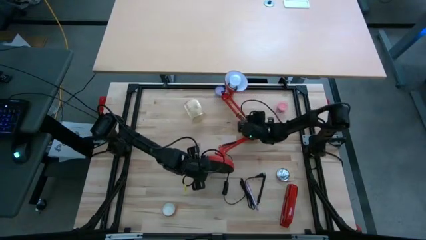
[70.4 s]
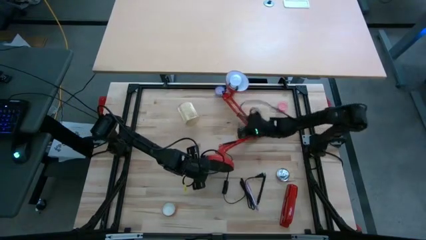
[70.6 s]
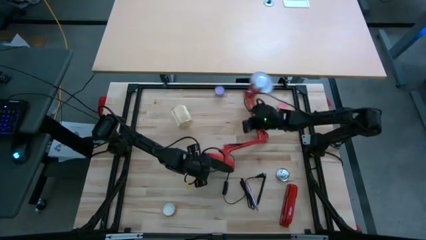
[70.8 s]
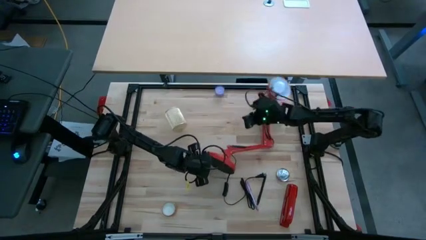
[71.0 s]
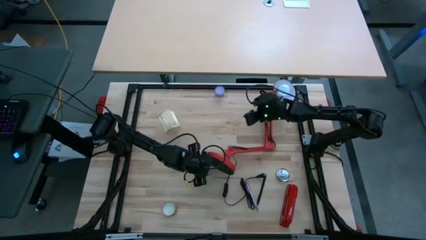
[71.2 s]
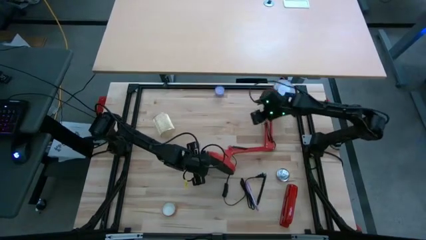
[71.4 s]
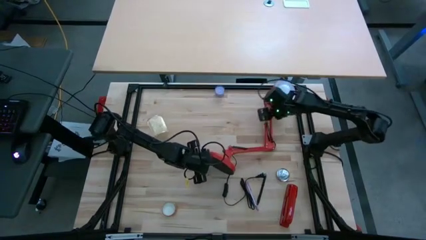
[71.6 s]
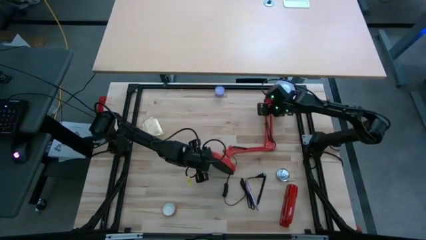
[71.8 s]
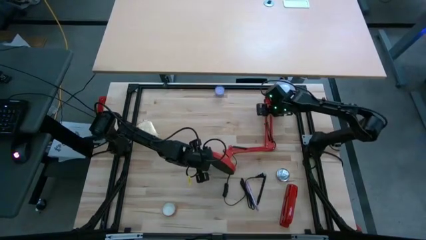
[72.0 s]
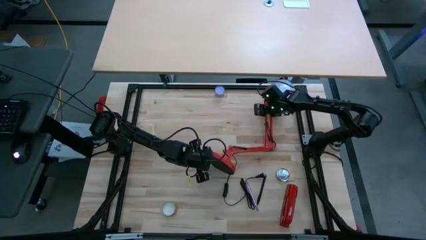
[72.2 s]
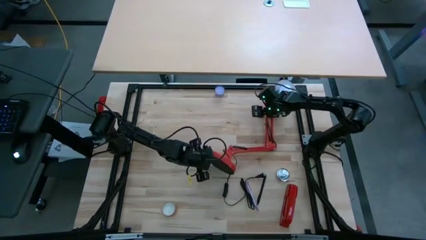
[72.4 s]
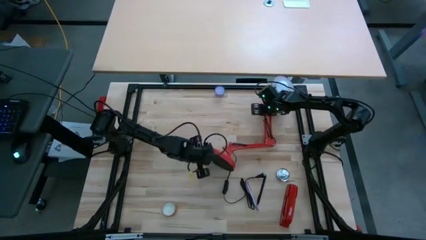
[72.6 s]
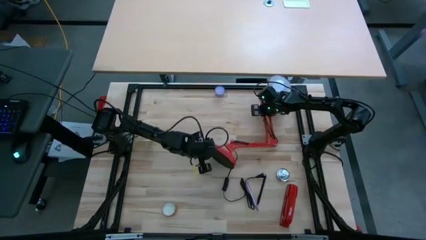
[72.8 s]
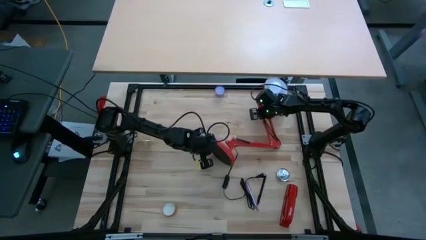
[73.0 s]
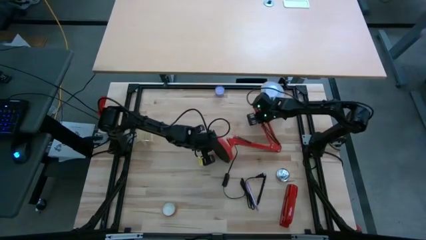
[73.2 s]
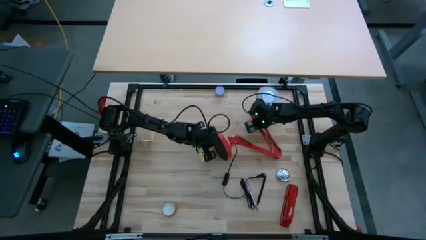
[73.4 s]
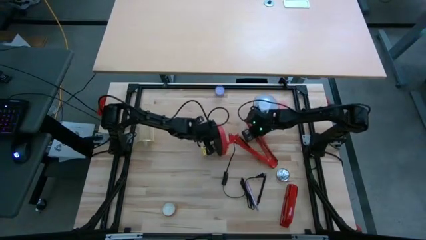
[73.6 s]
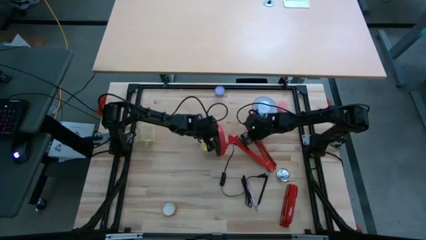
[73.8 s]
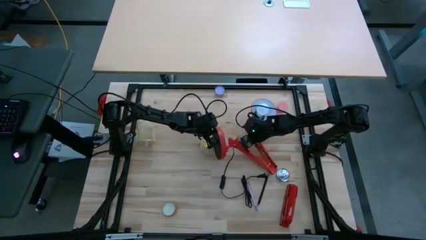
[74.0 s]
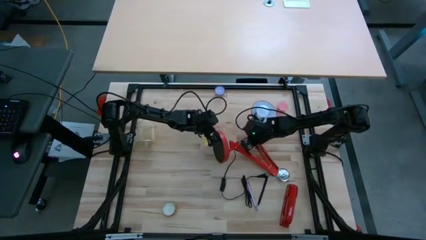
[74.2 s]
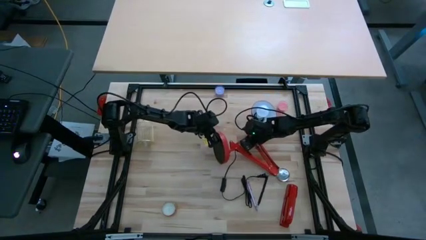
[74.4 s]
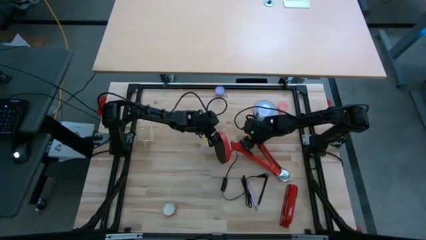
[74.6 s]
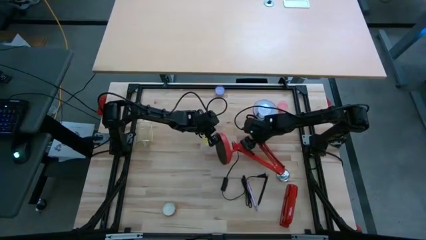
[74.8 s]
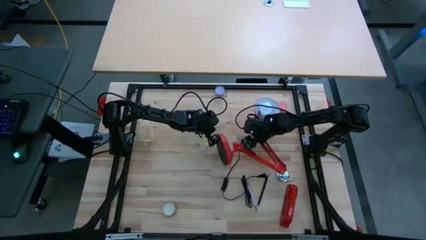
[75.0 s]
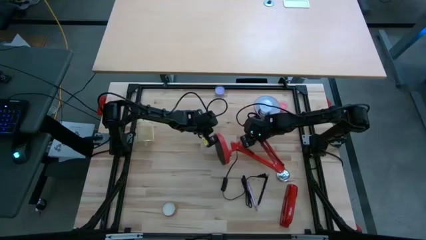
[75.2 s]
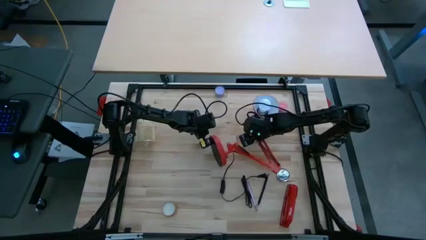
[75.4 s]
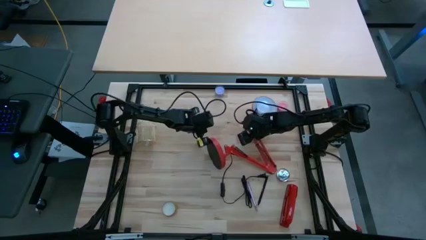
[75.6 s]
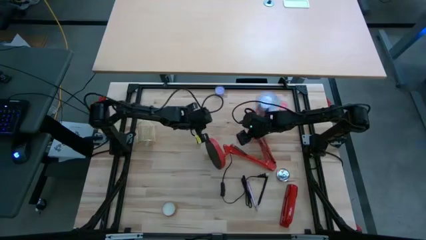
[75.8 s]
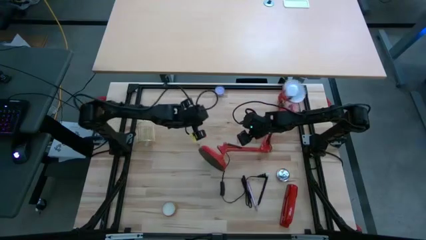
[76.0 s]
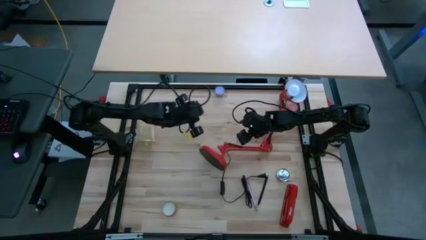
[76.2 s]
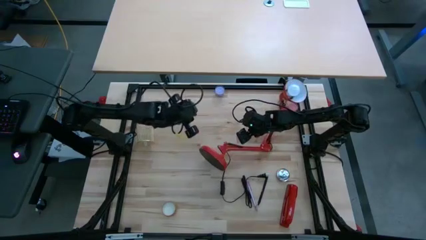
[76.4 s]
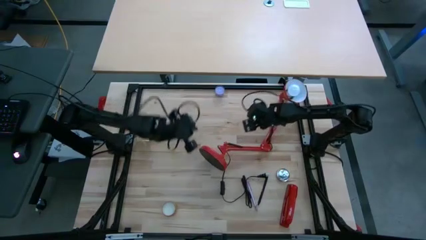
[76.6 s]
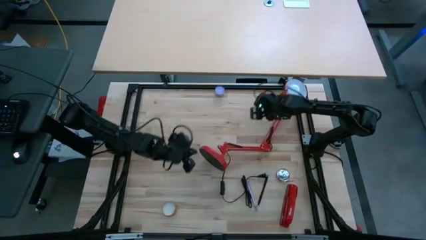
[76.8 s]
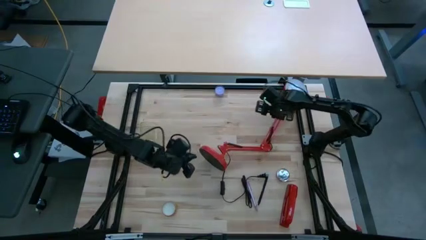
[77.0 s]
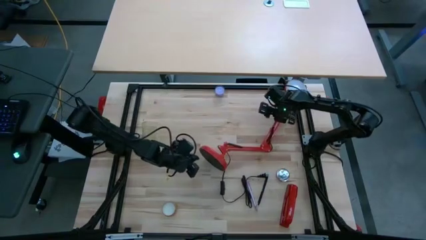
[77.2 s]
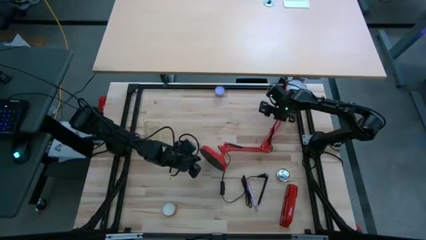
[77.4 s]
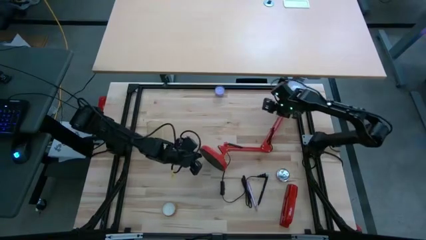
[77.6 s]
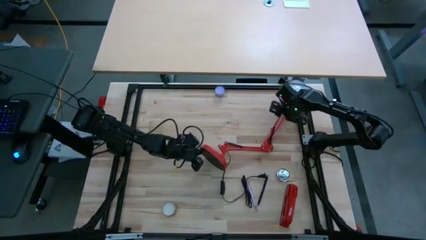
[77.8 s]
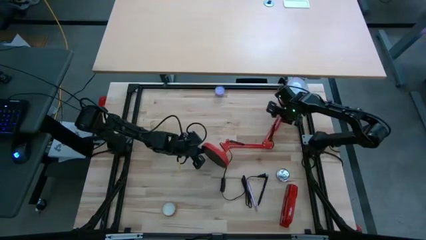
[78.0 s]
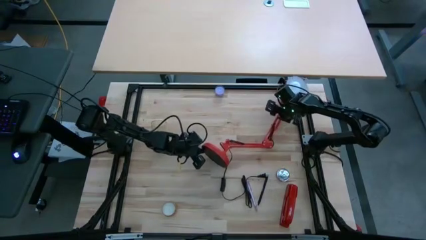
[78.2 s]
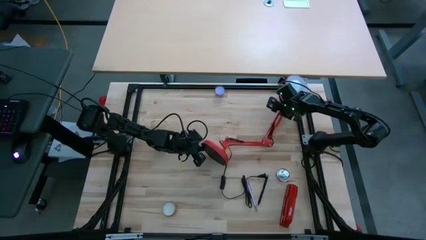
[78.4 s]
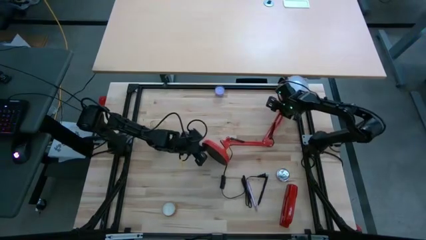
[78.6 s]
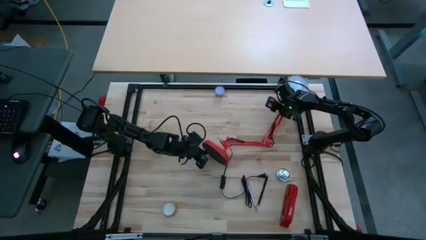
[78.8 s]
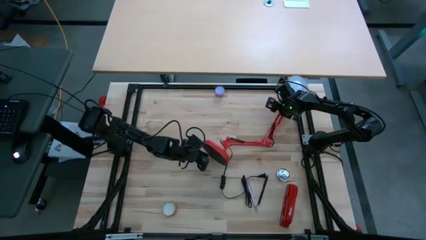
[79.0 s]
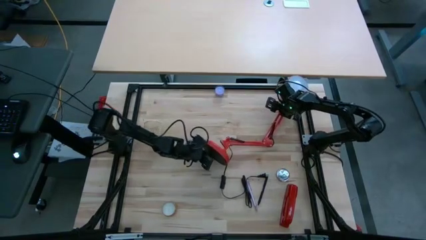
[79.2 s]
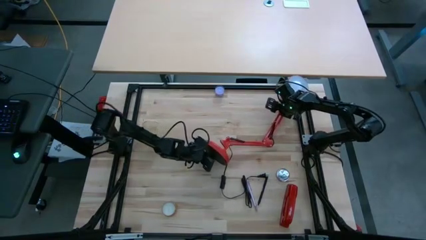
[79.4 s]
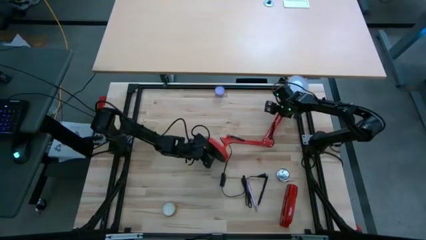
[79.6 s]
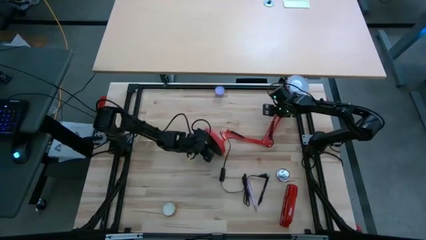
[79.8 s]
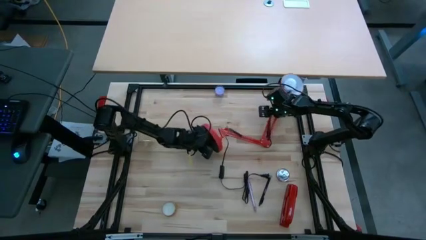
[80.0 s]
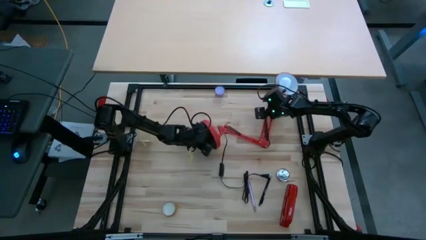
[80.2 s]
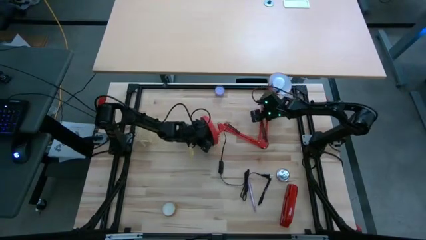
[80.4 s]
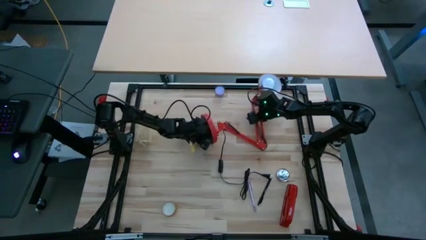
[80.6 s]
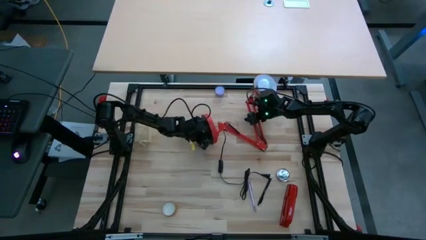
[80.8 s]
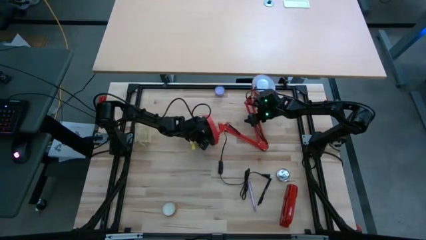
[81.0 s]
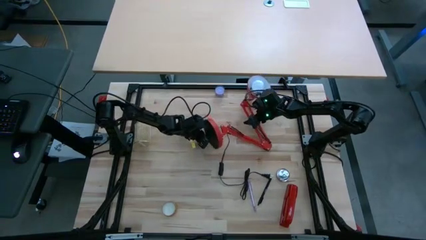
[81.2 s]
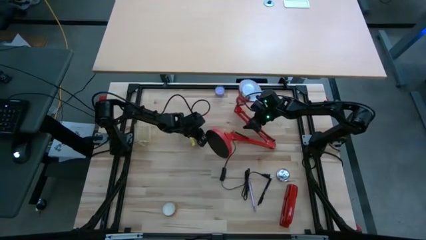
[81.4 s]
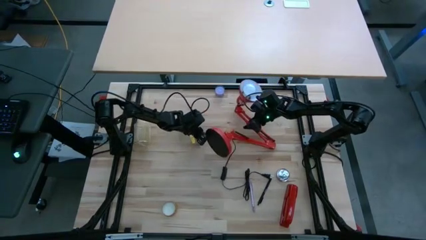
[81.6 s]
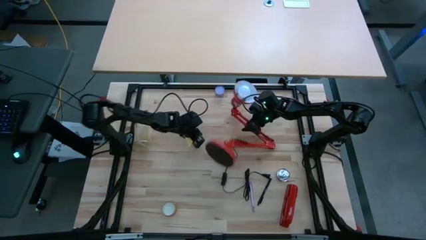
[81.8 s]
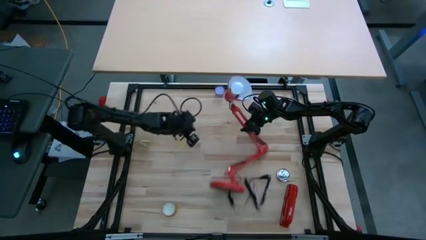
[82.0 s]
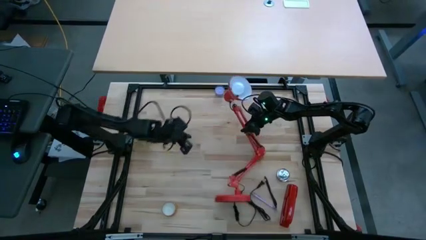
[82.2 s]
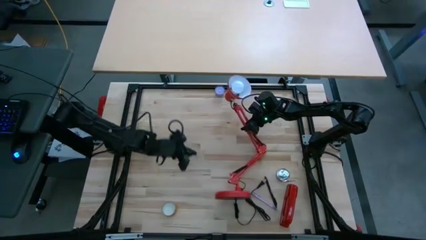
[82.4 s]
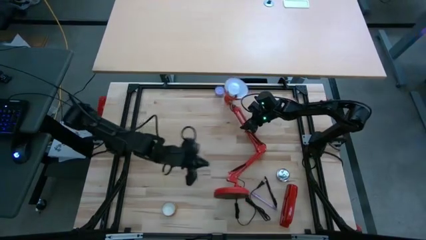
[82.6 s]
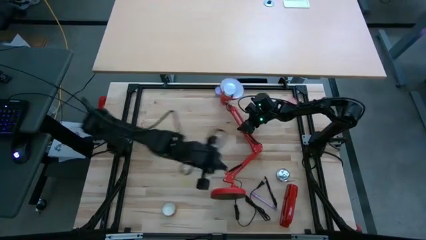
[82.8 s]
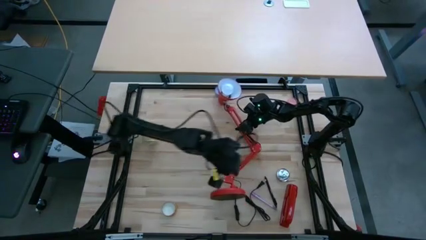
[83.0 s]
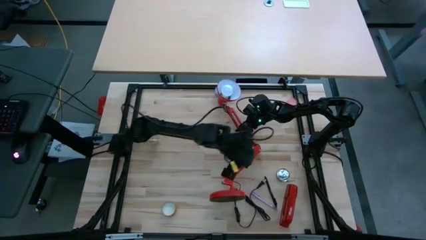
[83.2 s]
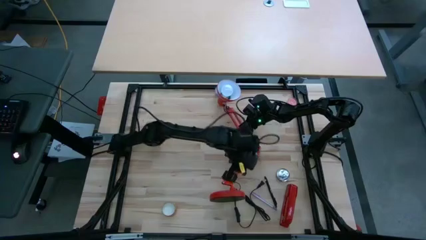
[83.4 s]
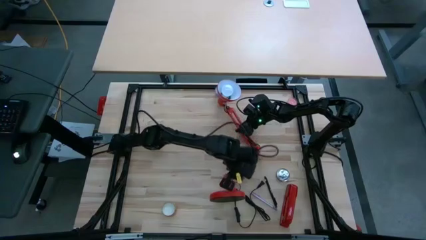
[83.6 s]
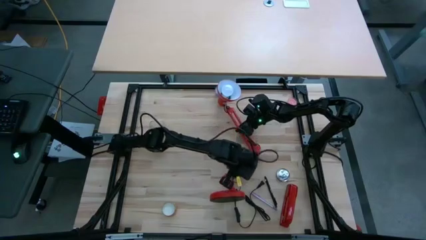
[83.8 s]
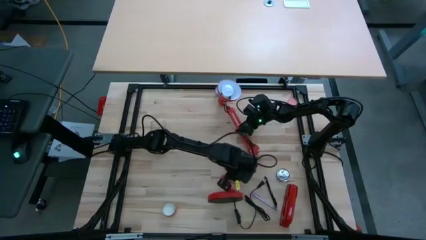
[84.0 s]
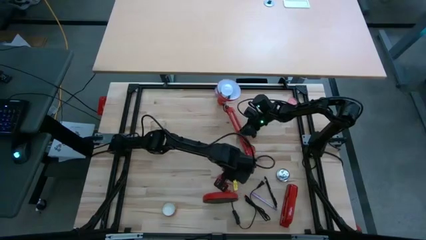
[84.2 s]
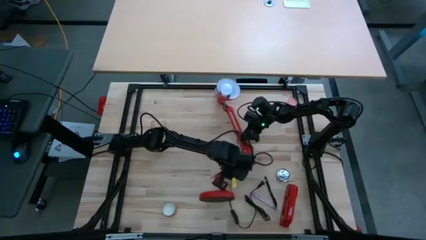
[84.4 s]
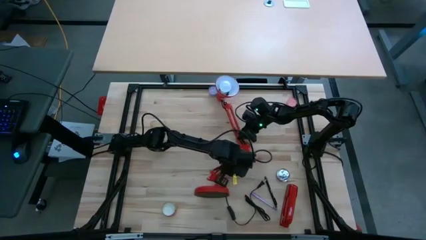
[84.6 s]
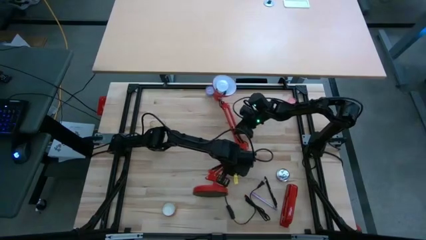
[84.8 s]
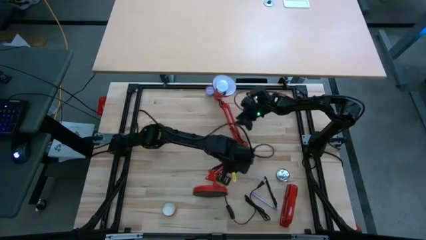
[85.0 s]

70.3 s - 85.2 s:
Task: Screw lightbulb
Remove the white lightbulb from the desk lamp
